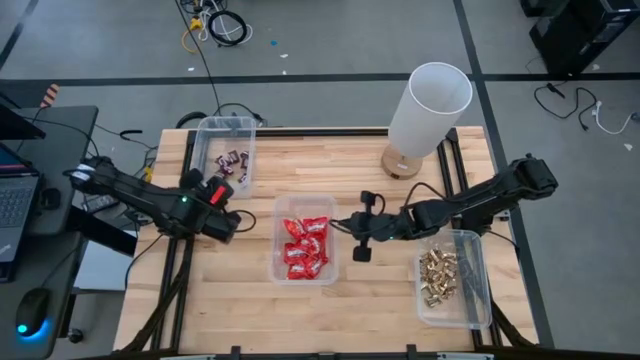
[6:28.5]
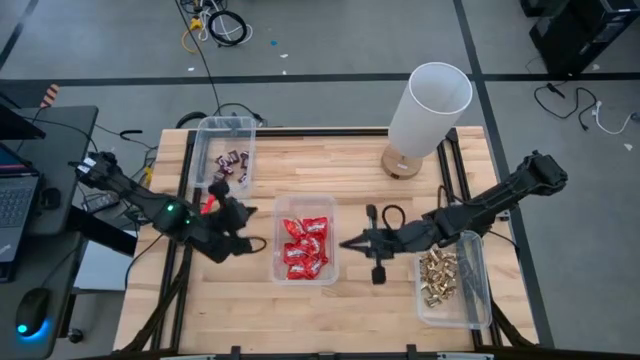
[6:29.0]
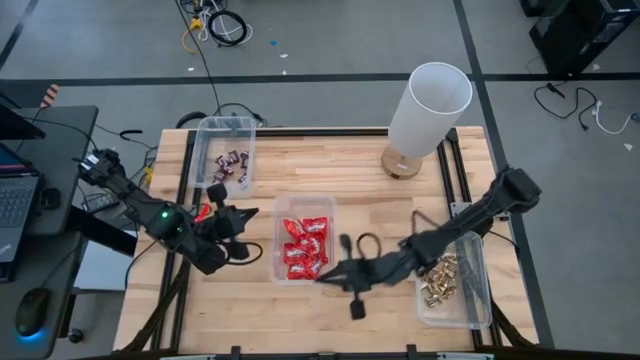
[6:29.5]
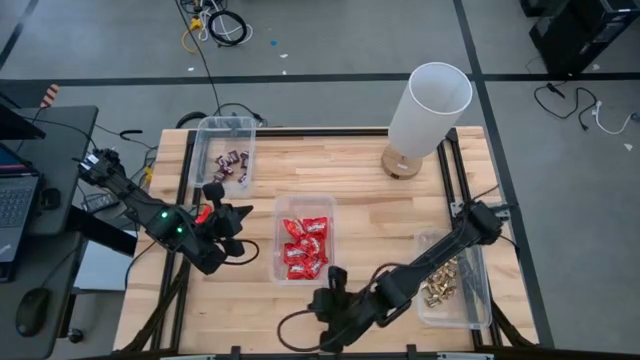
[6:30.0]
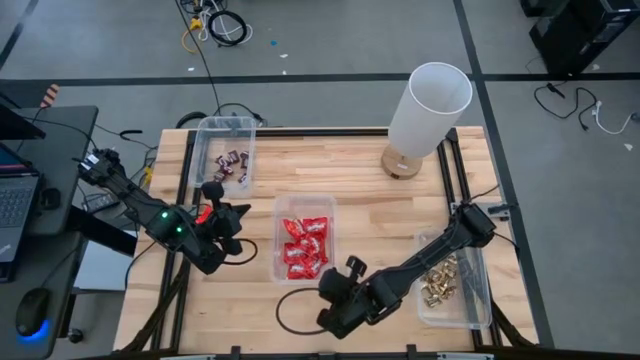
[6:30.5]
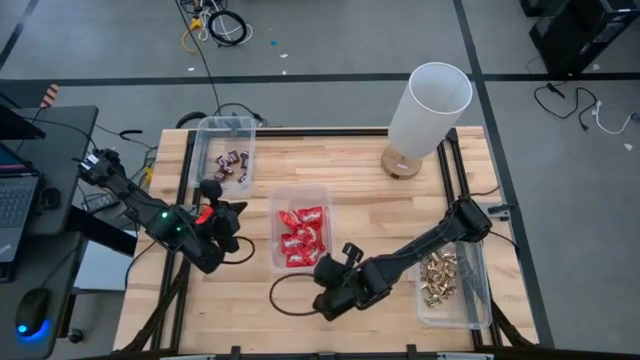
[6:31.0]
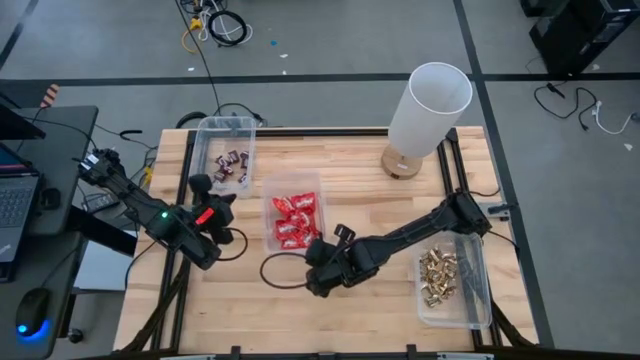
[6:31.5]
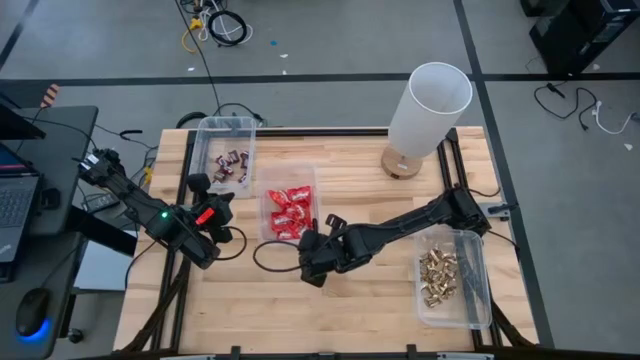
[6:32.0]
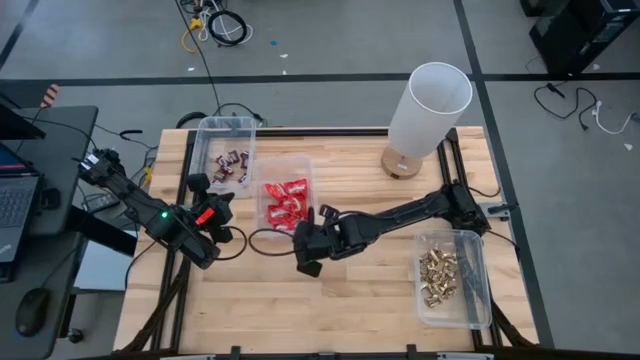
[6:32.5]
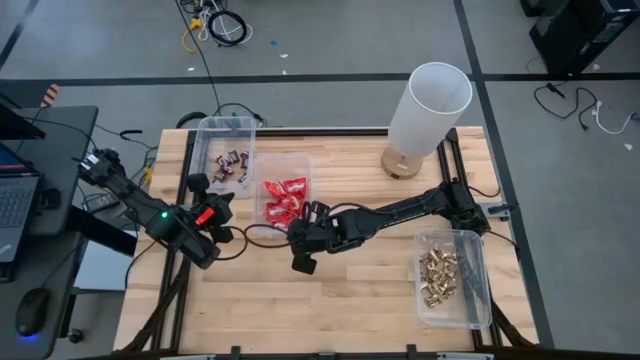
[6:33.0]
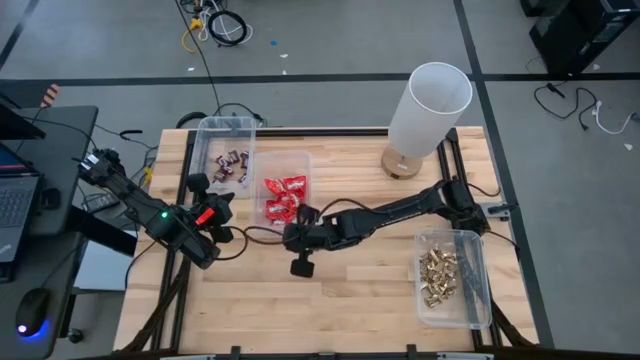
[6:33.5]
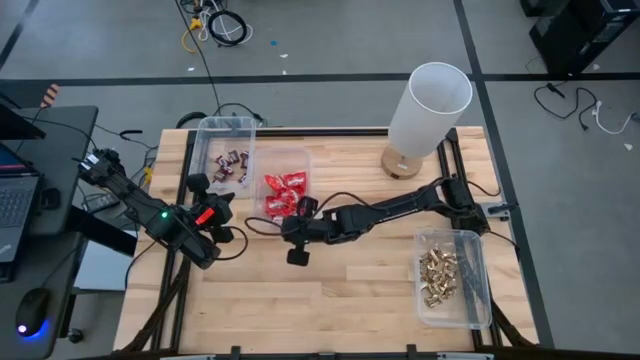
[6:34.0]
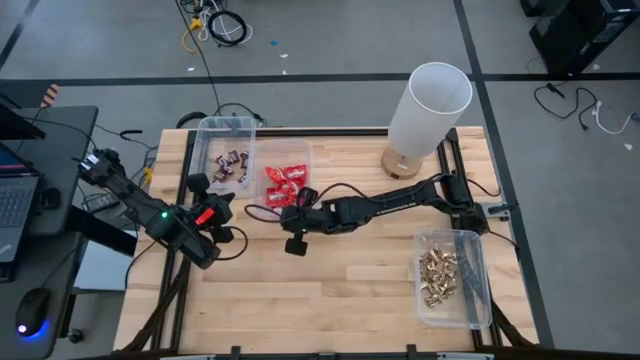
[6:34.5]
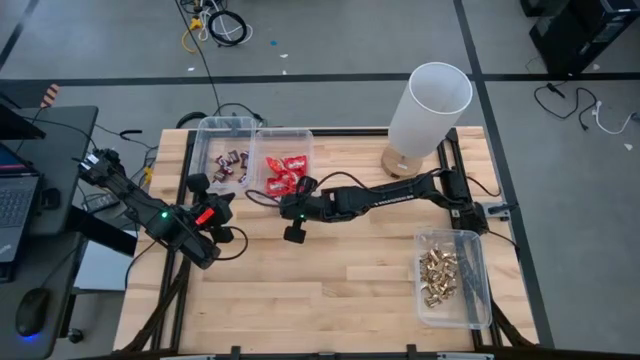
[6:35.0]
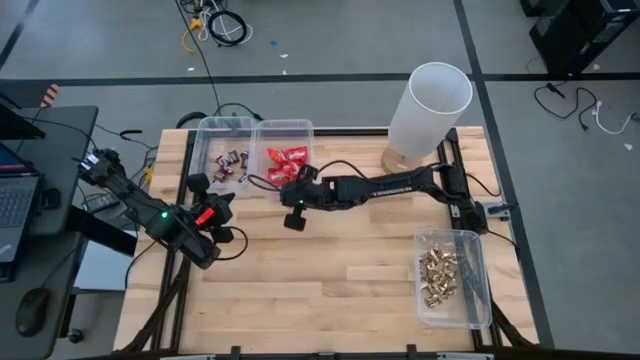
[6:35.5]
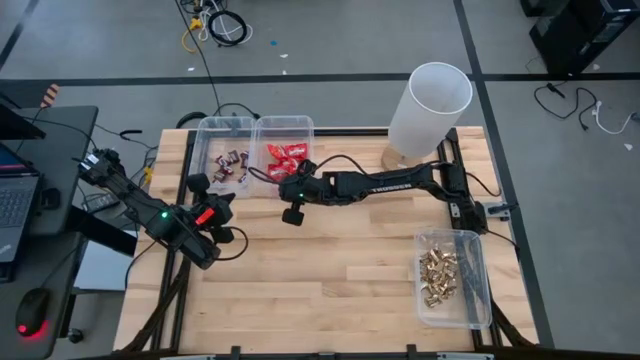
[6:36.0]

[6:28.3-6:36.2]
Task: Sort candy
Move the transparent bin to the top center of the table

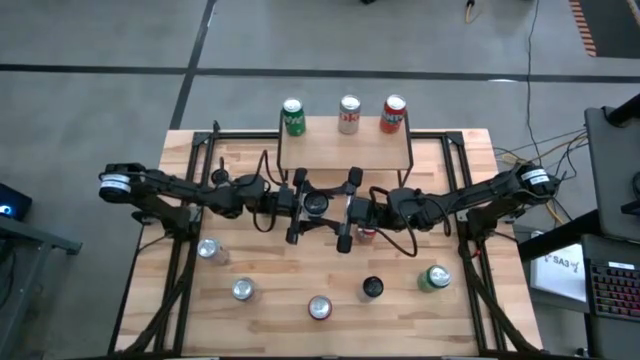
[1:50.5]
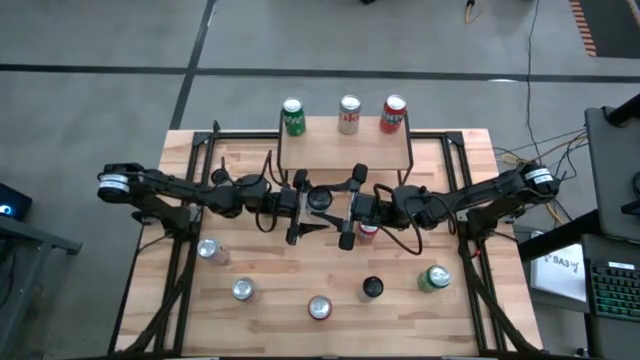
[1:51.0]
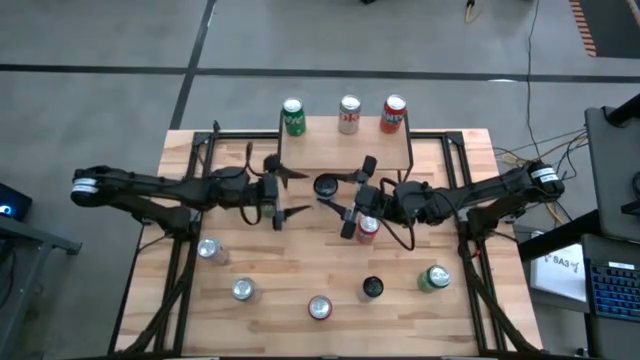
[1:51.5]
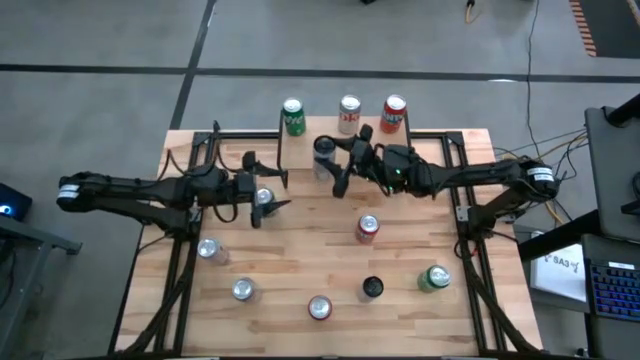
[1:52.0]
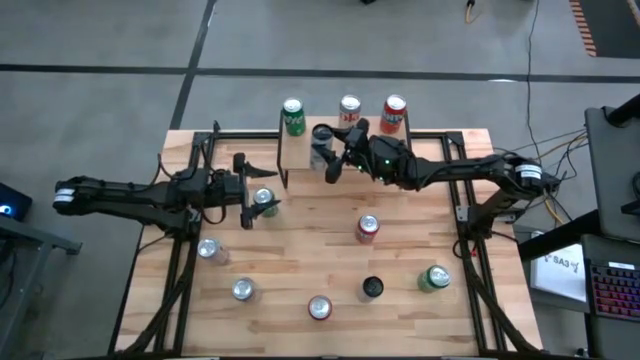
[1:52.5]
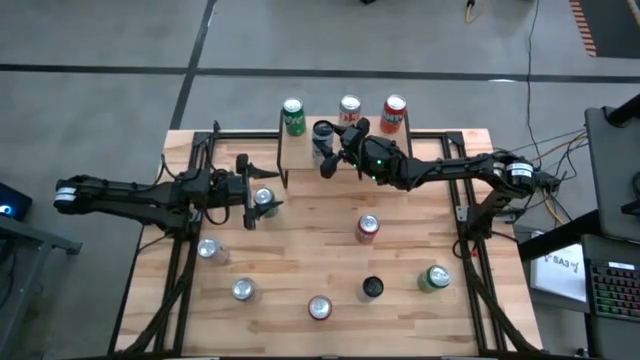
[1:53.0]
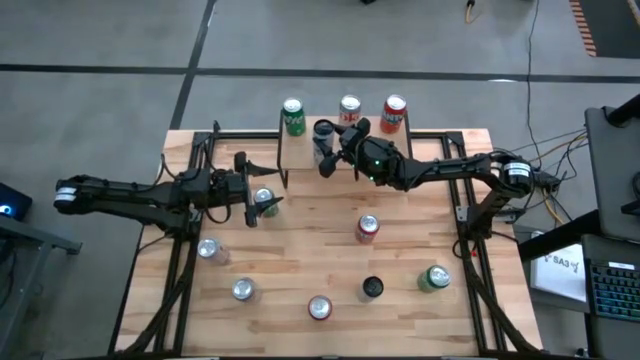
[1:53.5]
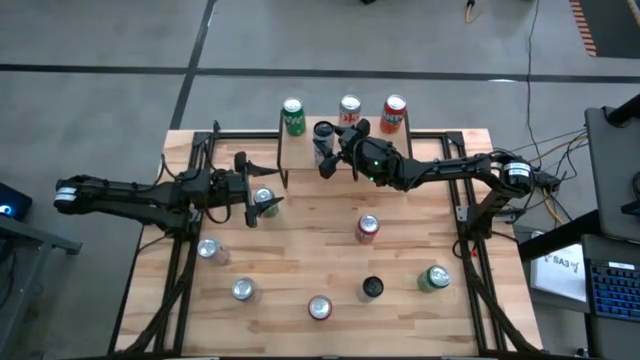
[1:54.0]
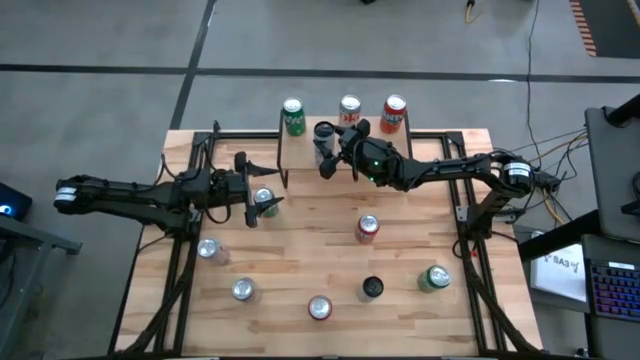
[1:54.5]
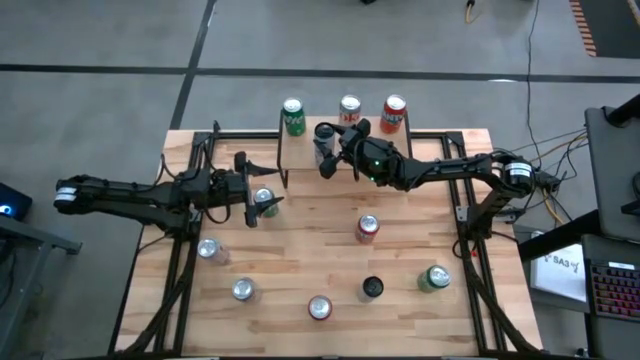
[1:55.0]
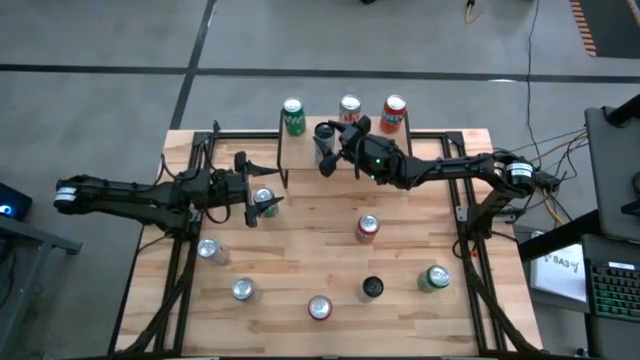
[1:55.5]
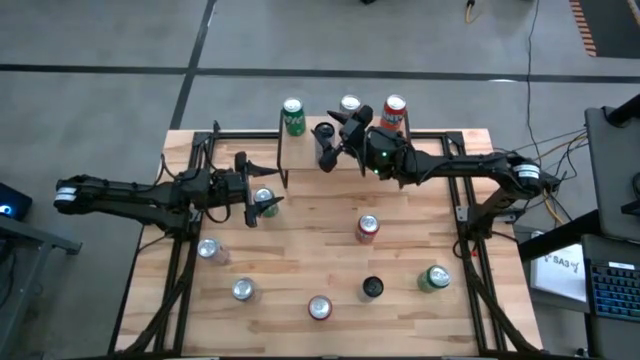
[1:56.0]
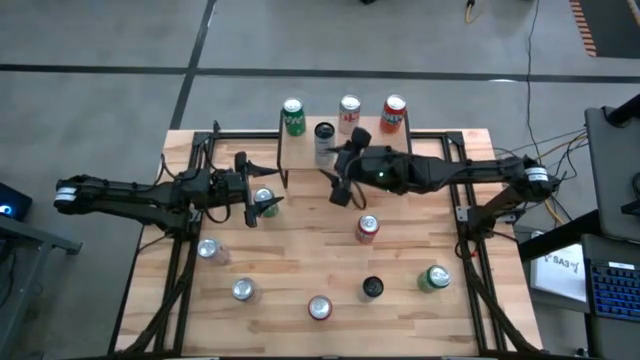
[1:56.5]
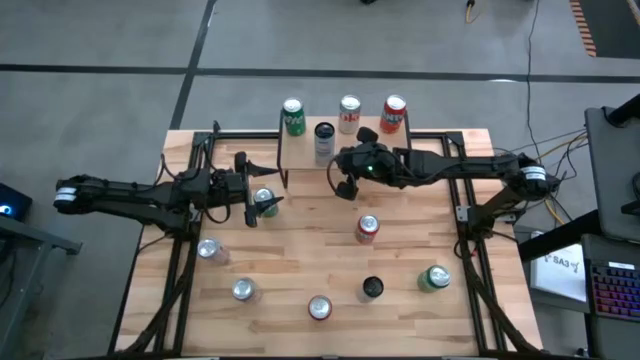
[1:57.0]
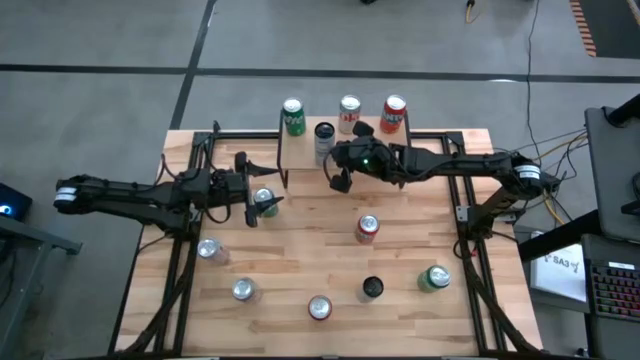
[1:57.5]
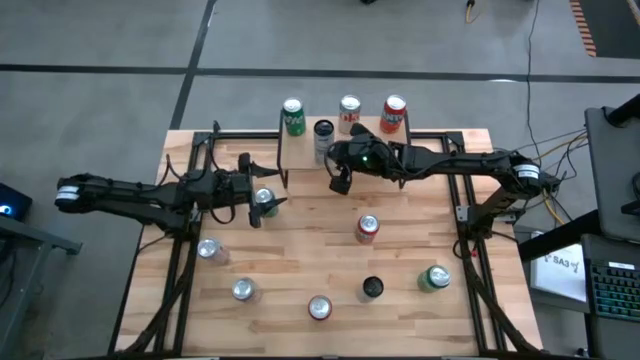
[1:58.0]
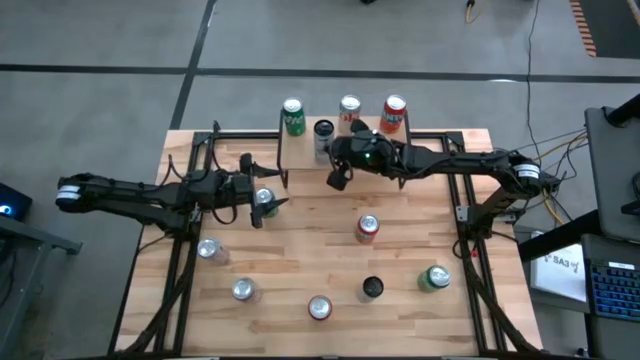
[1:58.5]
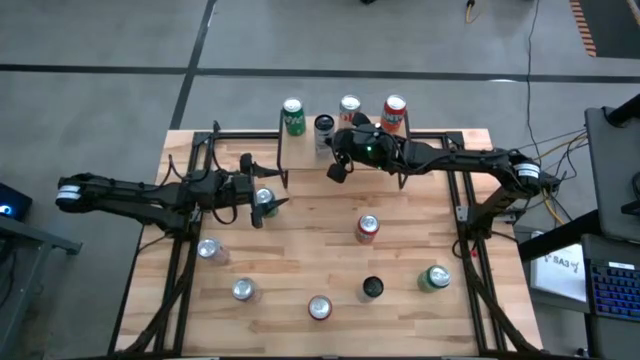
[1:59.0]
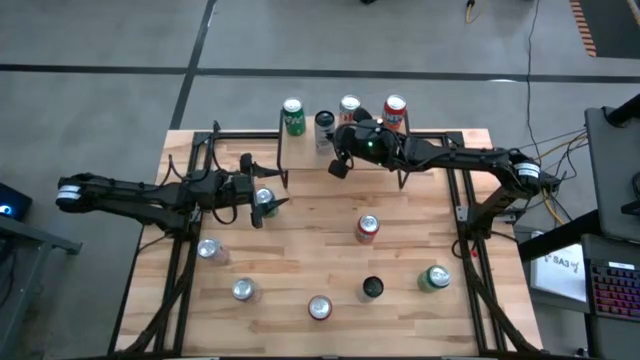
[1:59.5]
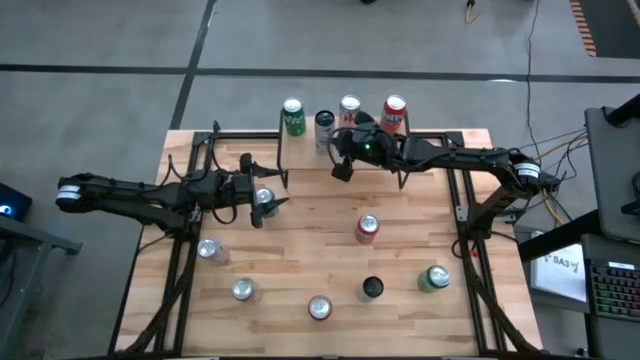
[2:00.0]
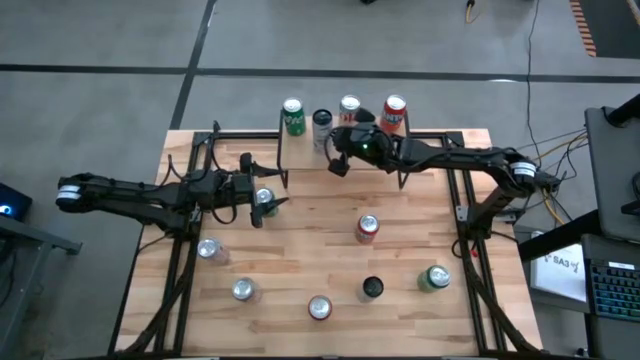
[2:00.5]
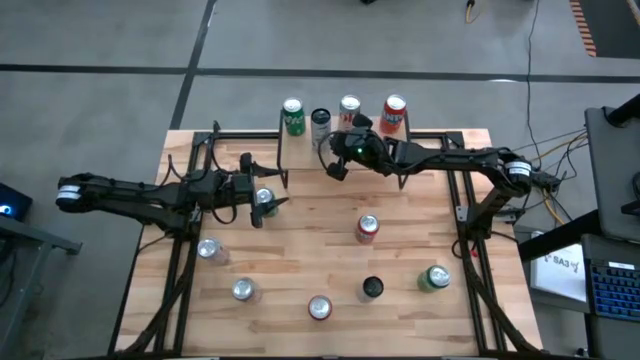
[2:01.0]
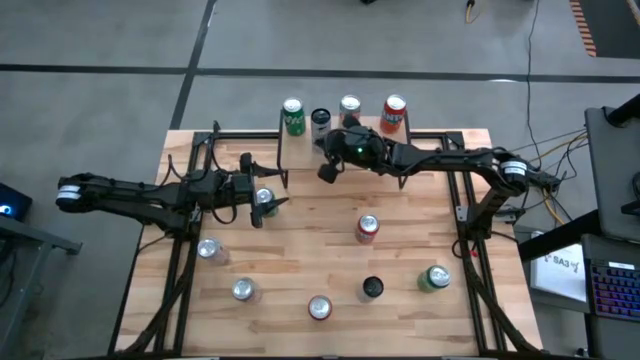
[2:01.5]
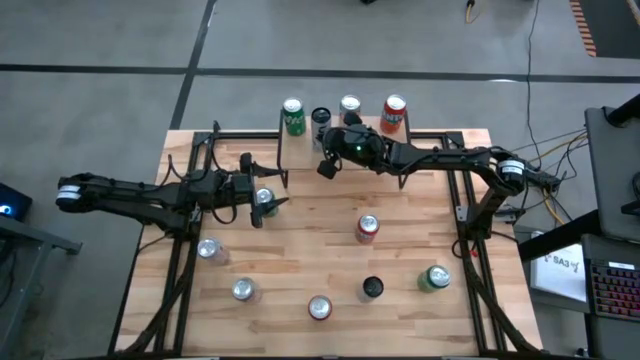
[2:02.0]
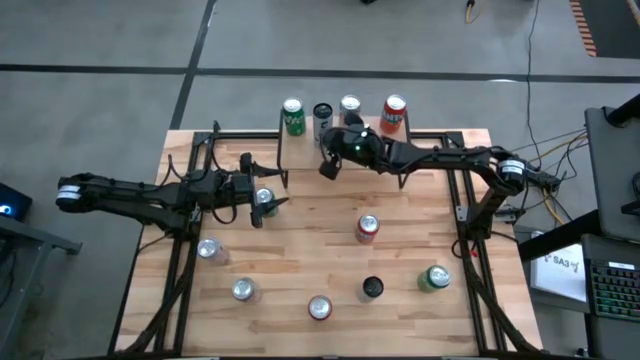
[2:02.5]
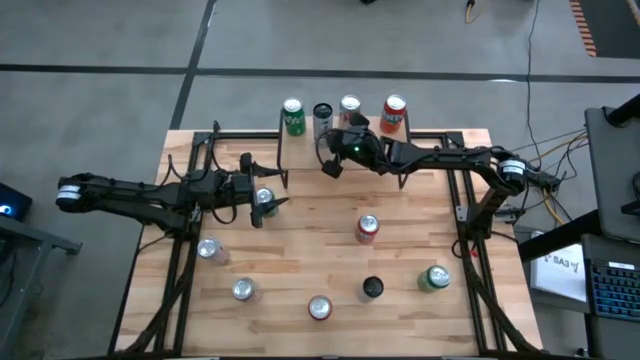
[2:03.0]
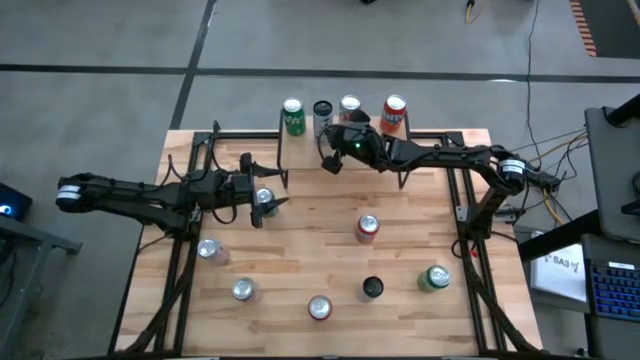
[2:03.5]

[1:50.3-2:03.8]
Task: Place canned beverage on shelf
Put the top white blue soda can on the shelf
